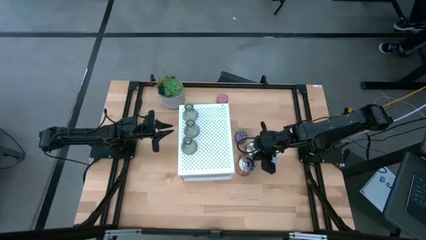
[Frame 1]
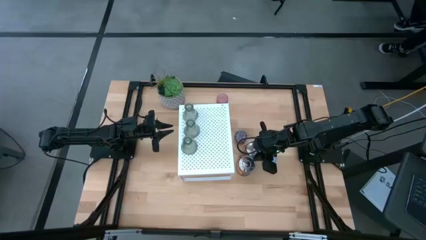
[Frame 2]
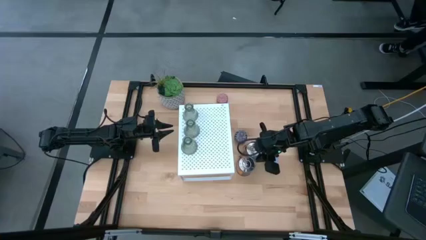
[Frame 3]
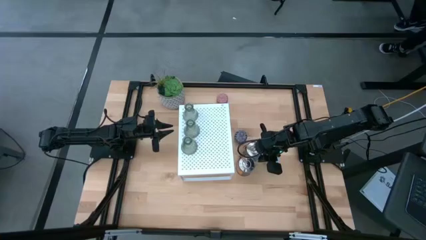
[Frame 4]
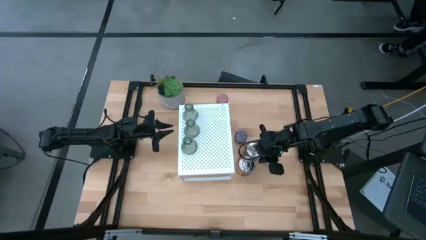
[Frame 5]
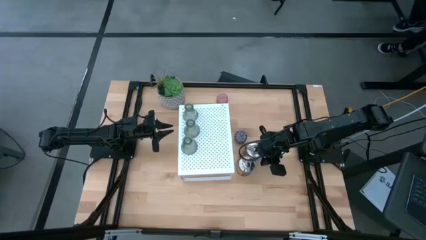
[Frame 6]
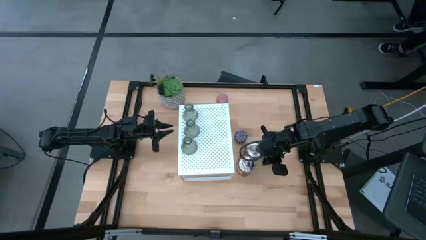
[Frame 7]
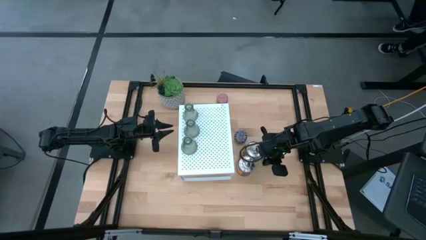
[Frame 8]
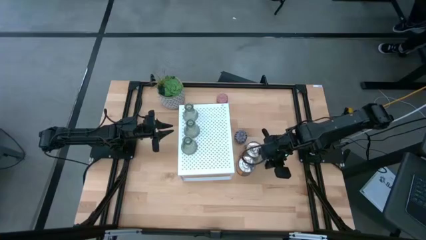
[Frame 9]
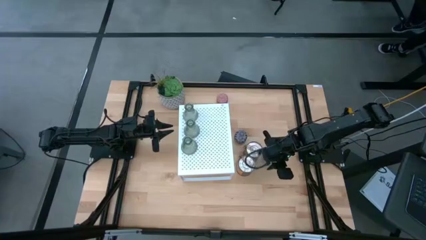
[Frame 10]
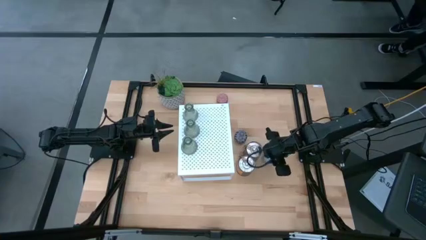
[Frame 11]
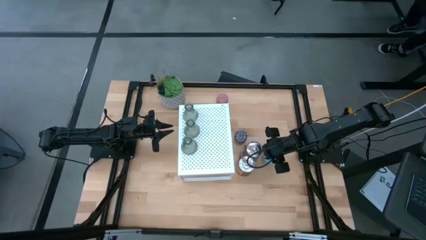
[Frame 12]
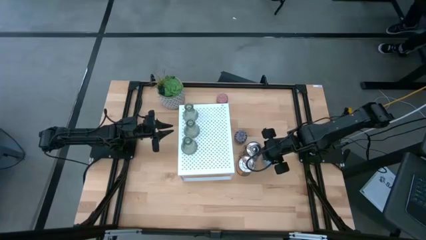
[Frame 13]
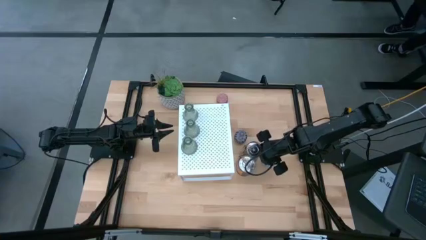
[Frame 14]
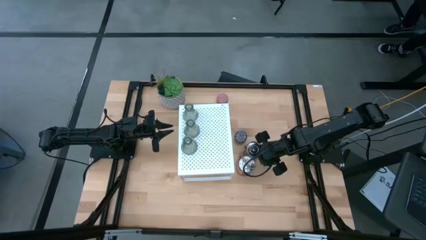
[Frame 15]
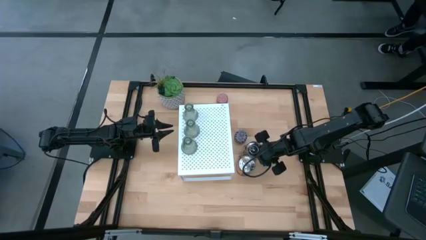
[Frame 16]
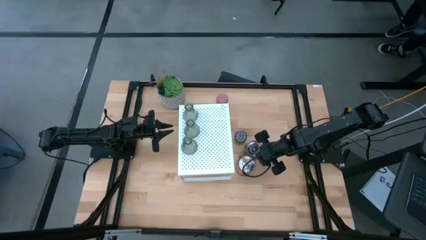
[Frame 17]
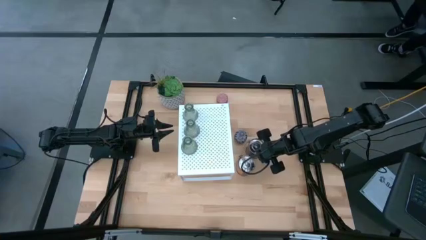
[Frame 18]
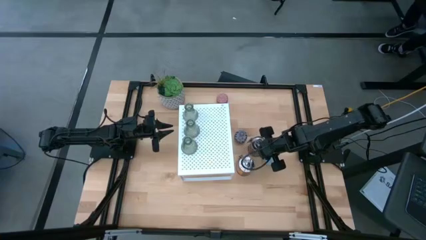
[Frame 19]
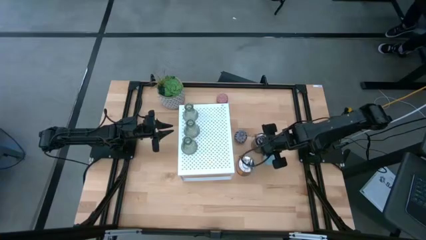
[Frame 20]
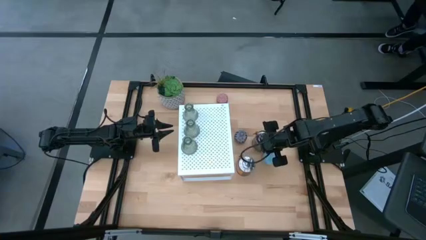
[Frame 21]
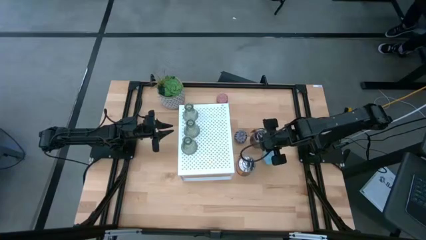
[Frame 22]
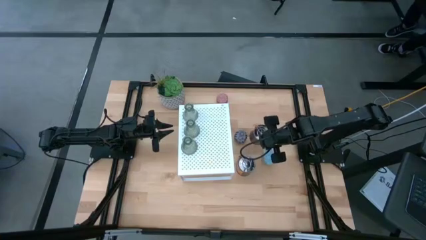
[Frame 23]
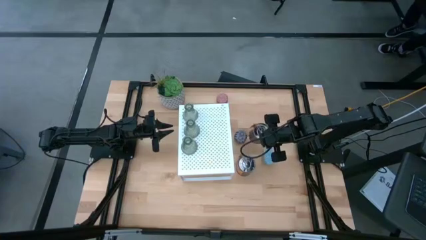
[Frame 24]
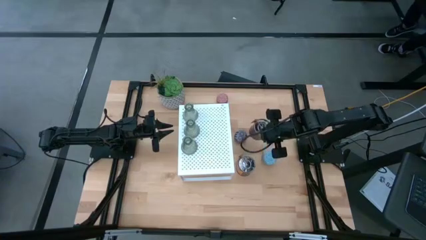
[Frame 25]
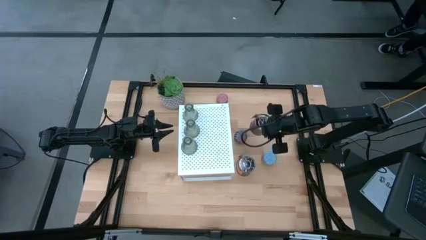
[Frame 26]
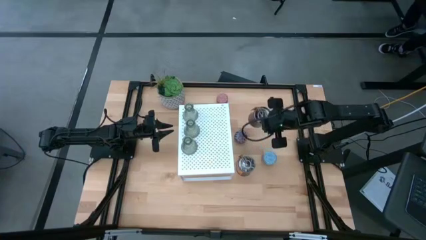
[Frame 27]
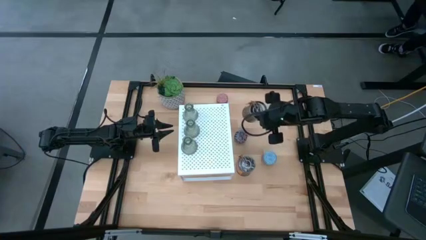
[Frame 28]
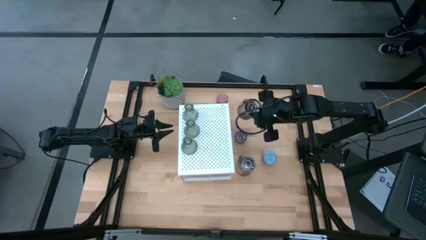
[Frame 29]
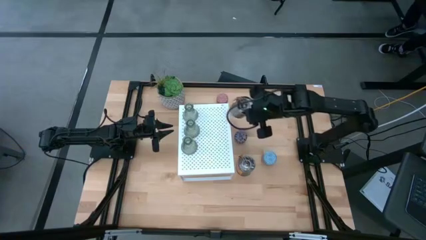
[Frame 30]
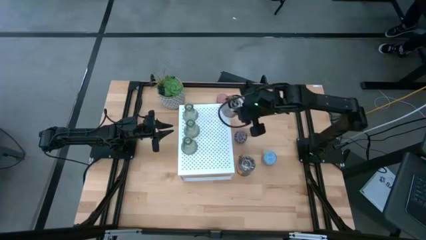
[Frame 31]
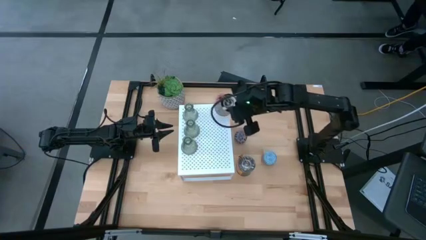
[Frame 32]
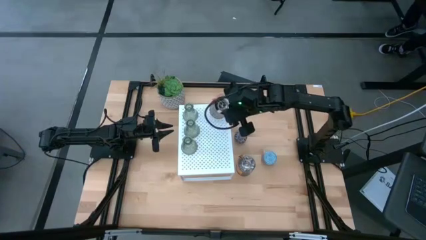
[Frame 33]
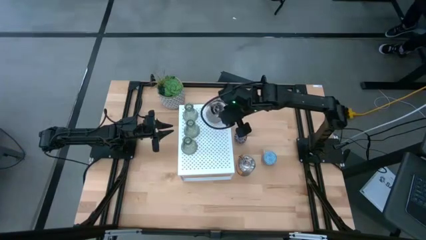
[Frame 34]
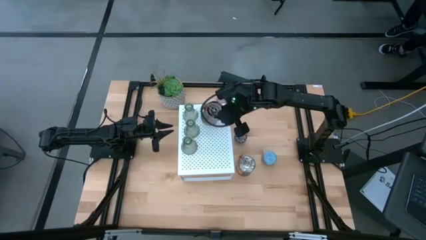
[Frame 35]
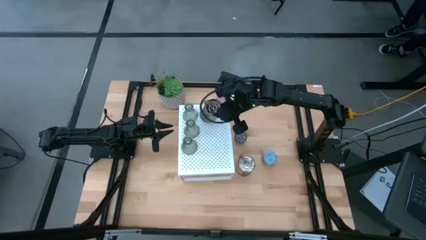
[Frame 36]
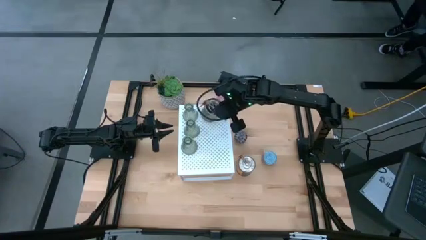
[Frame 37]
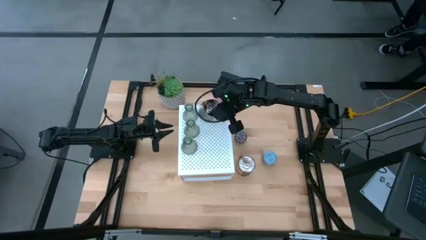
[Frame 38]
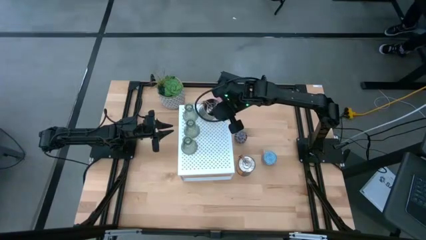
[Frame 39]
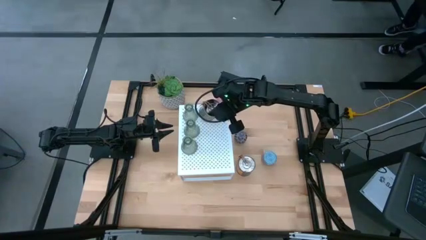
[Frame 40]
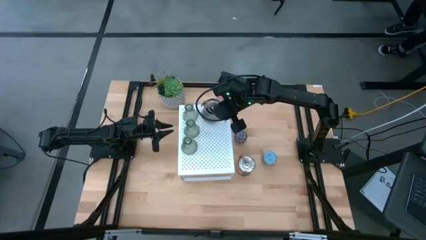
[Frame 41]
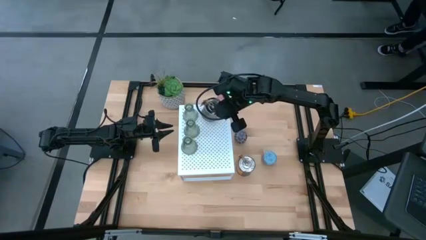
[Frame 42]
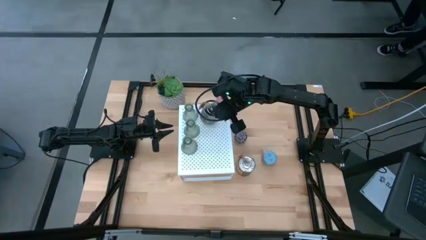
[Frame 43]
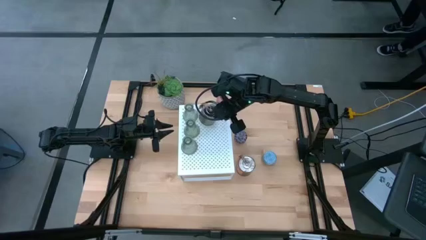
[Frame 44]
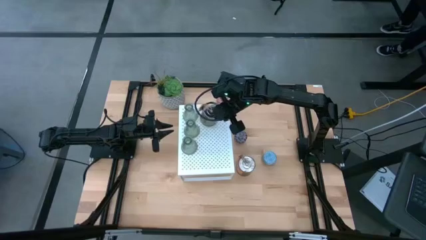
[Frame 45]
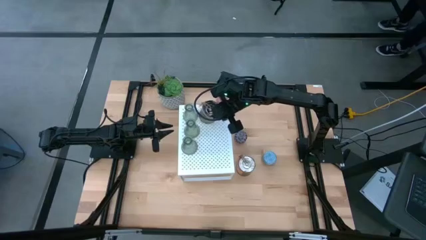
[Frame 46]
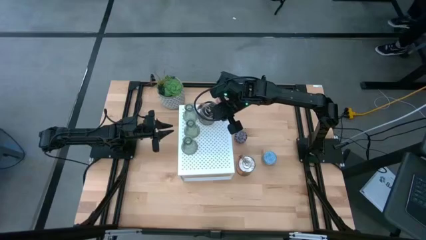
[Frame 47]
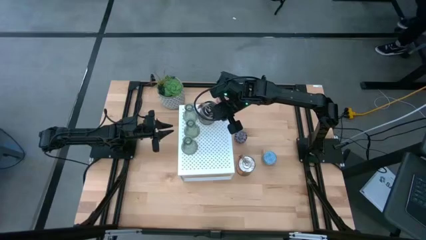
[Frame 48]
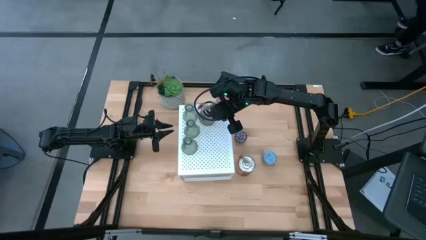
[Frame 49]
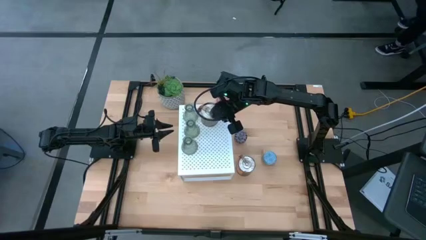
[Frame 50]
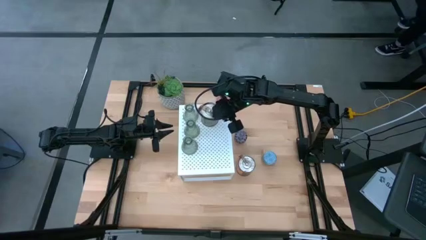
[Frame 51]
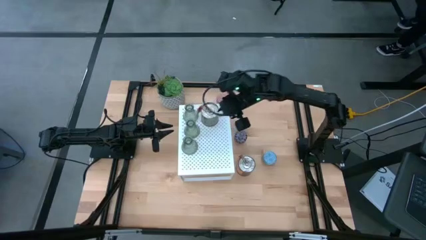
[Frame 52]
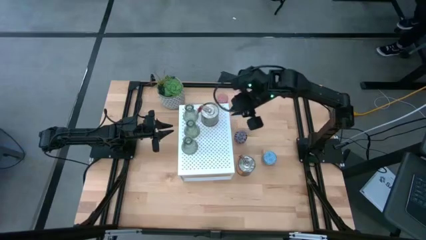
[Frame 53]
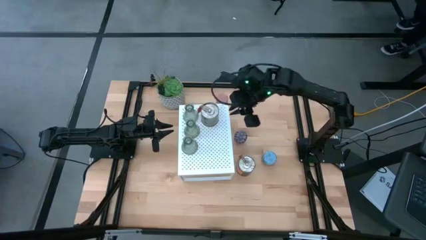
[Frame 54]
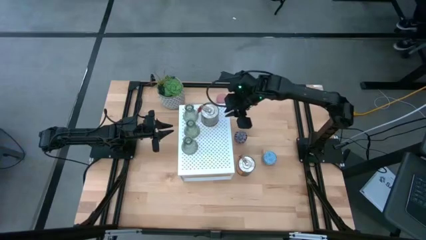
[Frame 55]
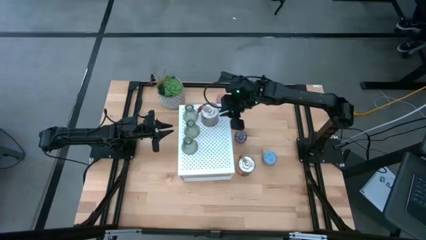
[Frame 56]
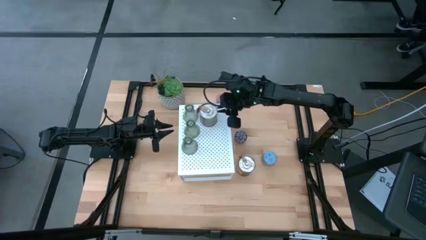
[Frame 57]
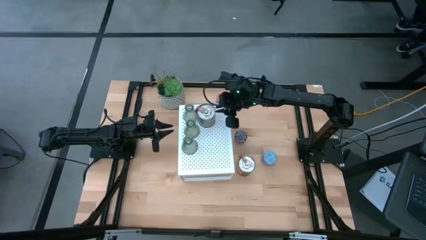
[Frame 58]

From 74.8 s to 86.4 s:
Task: Pick & Place candle stick holders
Put the top orange scented candle on the shelf

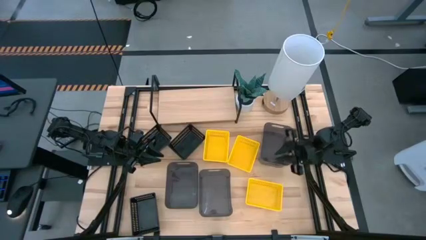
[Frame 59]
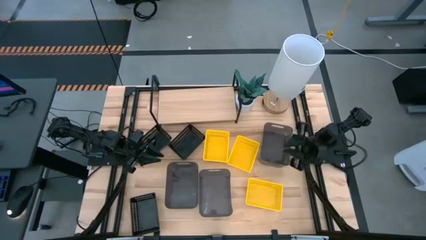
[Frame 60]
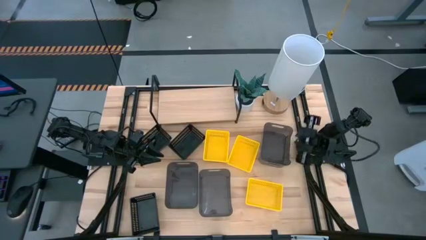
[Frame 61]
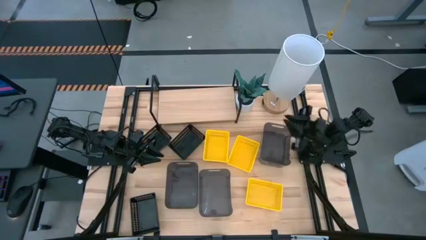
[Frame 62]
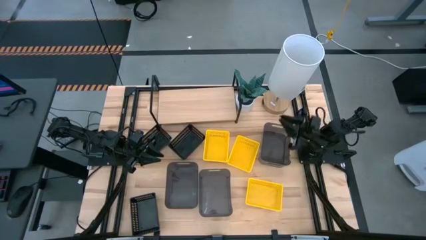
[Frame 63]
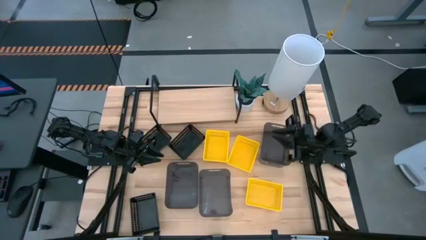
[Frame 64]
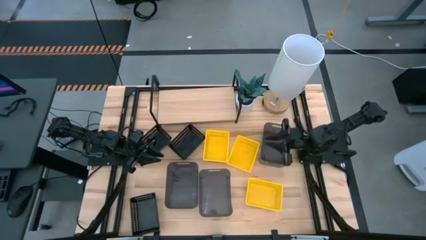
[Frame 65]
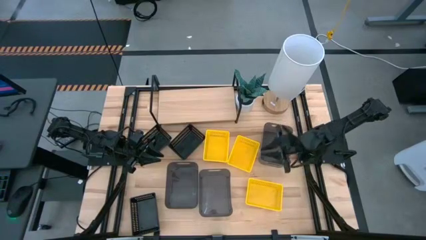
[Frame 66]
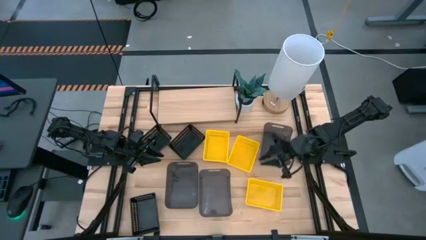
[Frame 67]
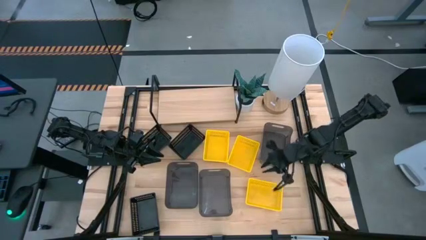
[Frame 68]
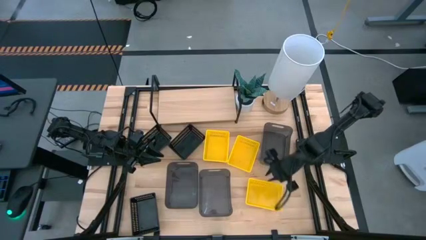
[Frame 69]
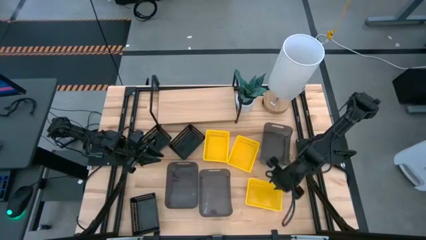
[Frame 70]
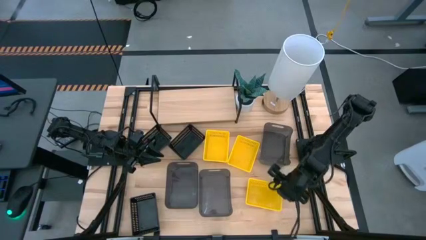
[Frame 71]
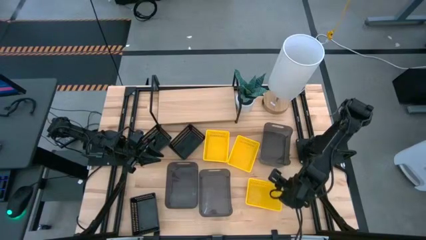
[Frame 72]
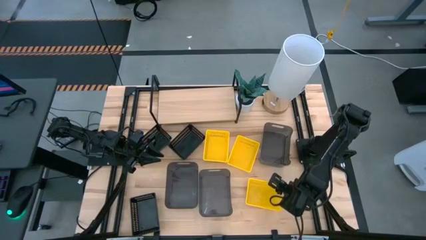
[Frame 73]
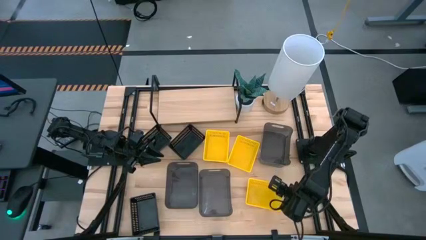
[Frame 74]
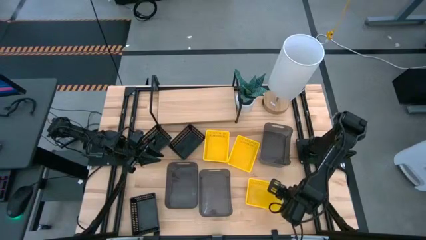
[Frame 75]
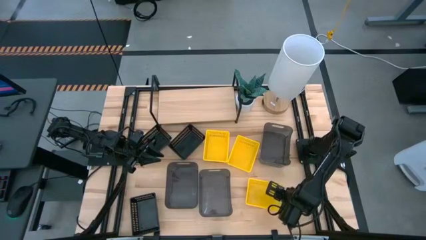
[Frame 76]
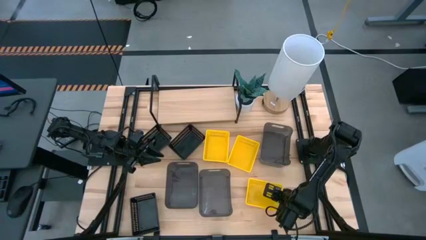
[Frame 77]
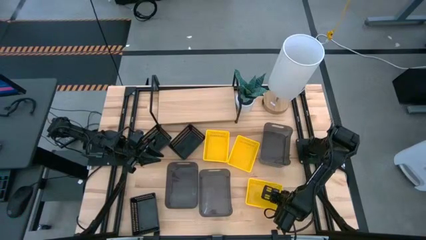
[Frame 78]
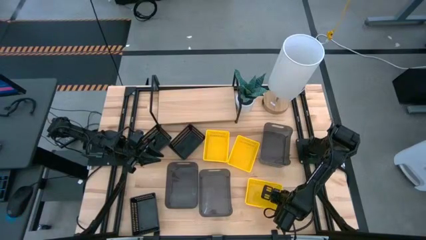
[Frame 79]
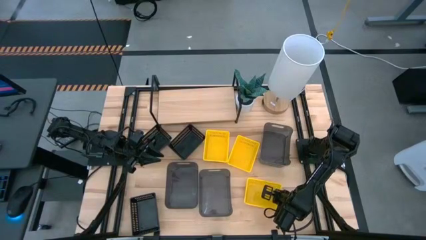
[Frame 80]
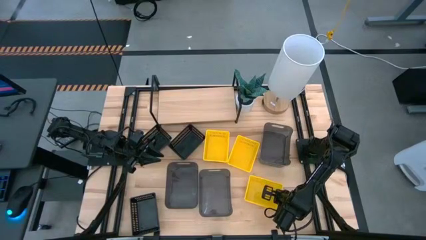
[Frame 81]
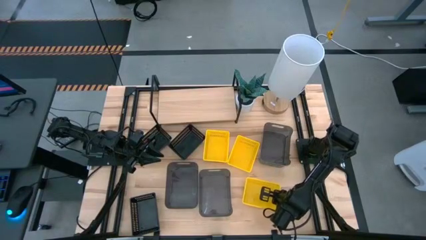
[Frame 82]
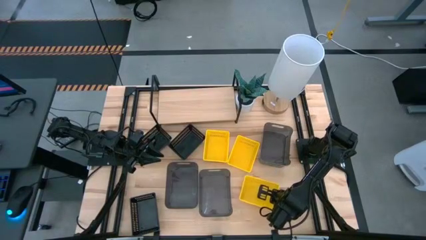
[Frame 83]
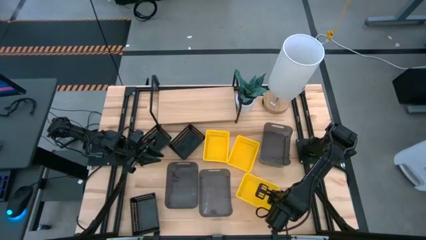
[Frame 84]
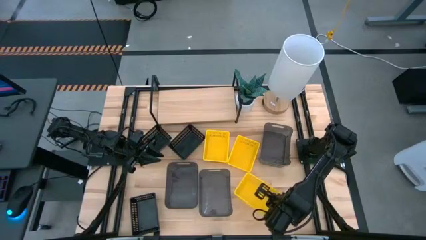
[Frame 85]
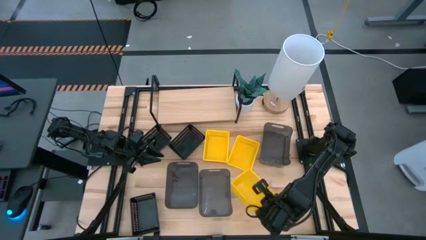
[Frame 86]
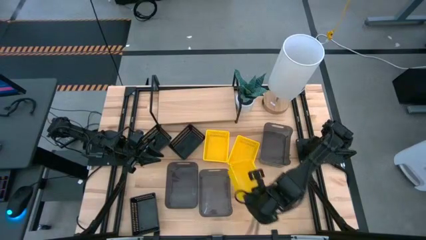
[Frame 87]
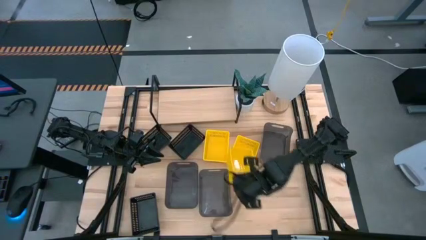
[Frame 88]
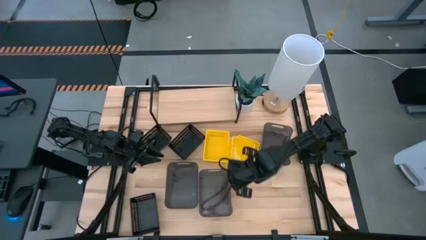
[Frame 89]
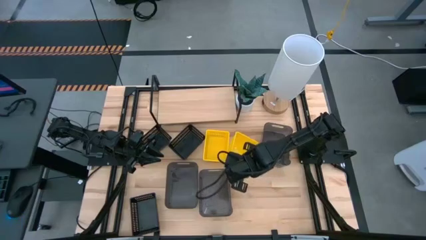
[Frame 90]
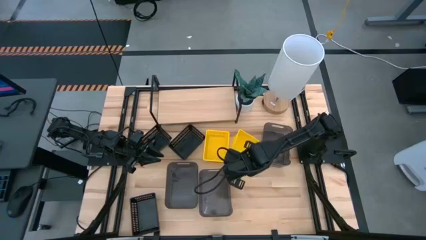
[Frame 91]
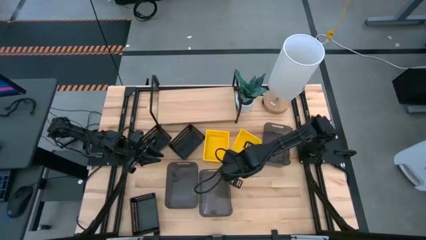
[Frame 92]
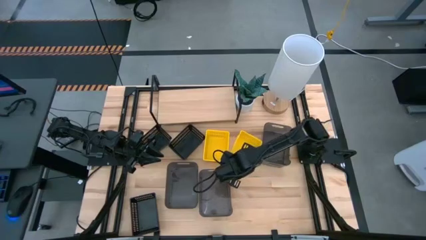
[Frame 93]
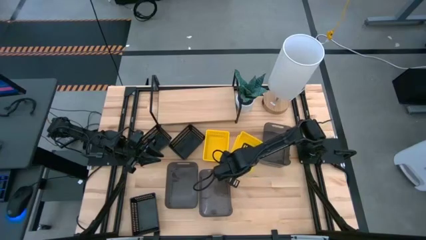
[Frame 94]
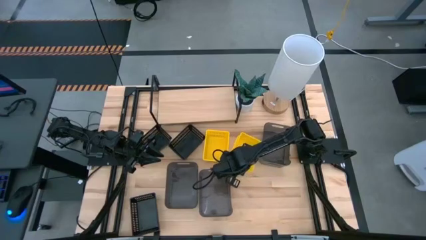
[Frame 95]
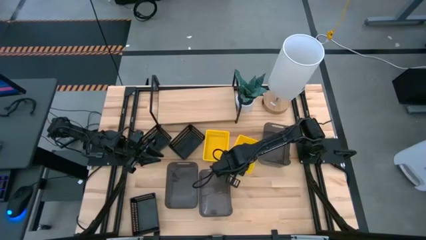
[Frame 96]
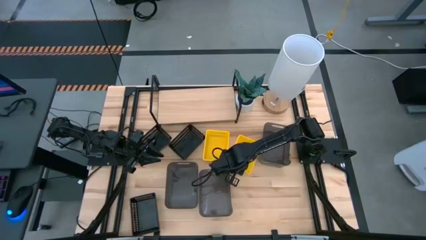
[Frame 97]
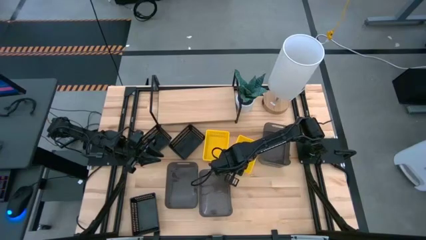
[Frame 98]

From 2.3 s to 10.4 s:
Task: Stack baskets on shelf by color
Stack the bottom yellow bin on the top right yellow bin
